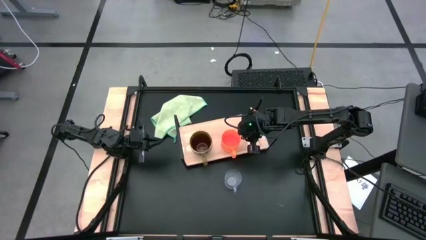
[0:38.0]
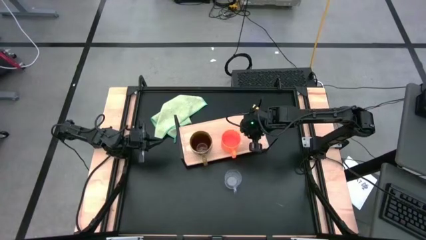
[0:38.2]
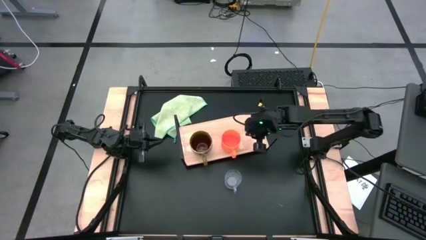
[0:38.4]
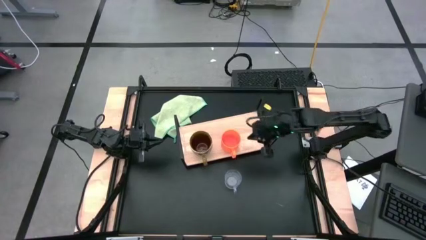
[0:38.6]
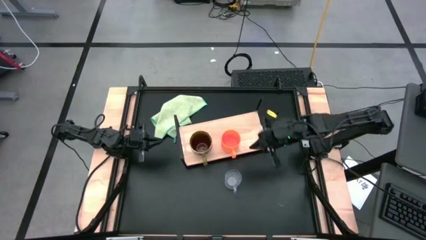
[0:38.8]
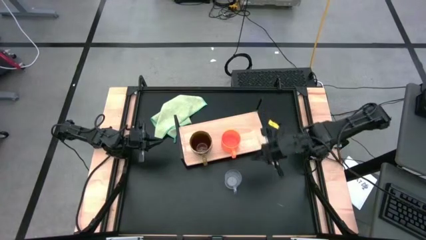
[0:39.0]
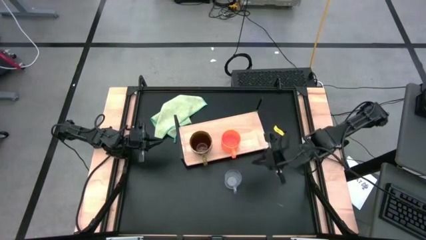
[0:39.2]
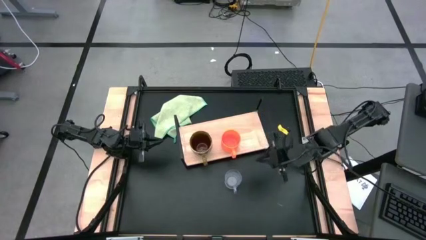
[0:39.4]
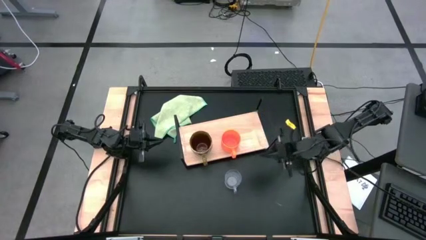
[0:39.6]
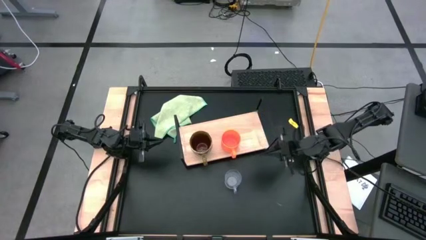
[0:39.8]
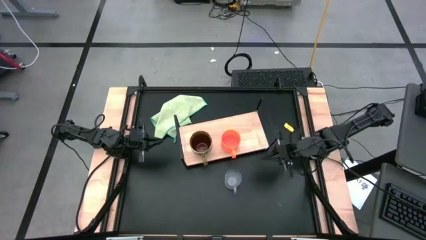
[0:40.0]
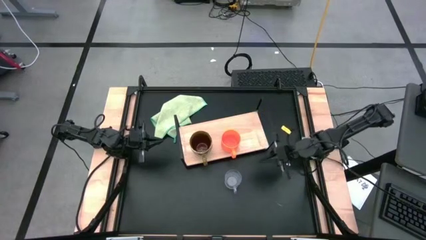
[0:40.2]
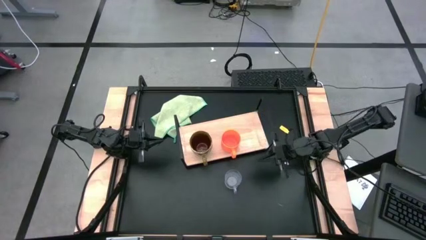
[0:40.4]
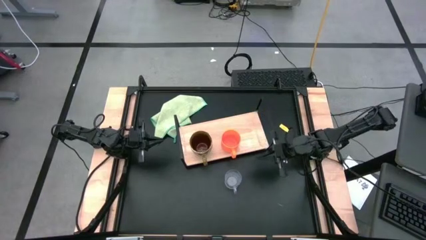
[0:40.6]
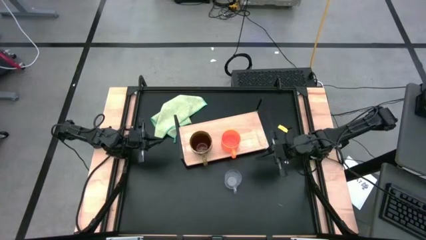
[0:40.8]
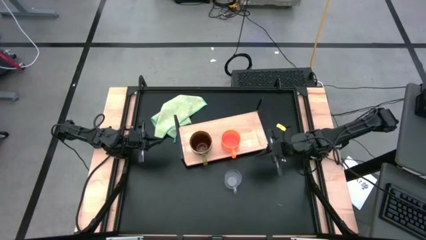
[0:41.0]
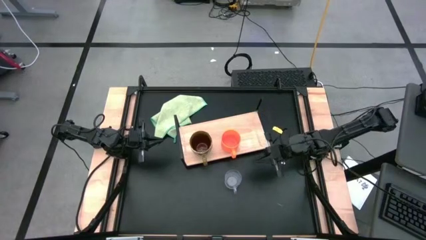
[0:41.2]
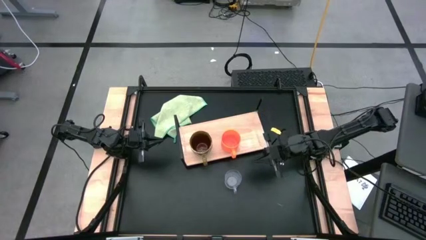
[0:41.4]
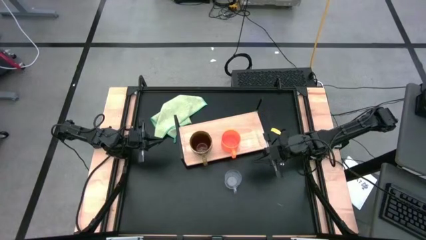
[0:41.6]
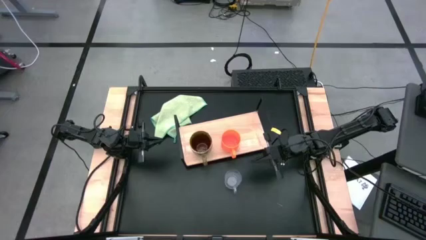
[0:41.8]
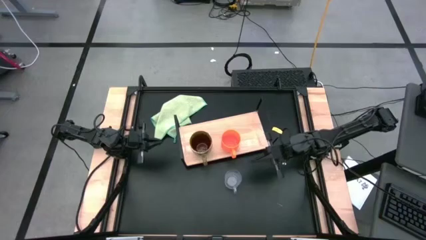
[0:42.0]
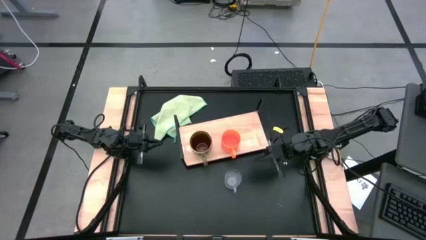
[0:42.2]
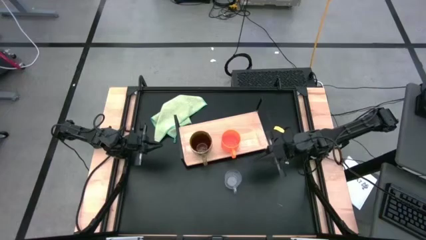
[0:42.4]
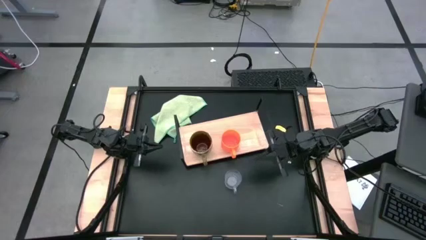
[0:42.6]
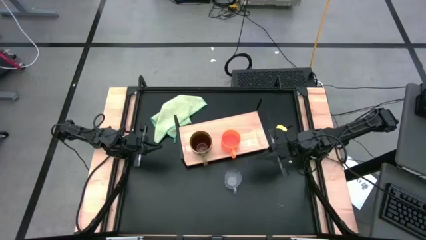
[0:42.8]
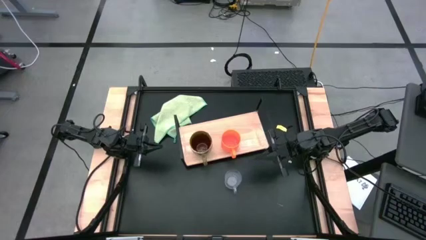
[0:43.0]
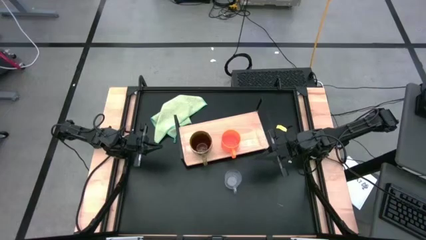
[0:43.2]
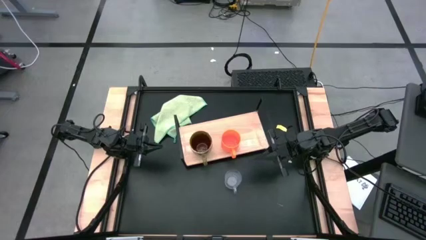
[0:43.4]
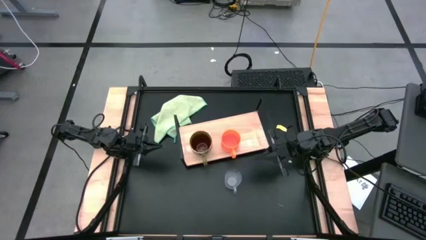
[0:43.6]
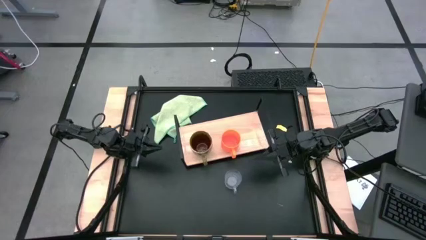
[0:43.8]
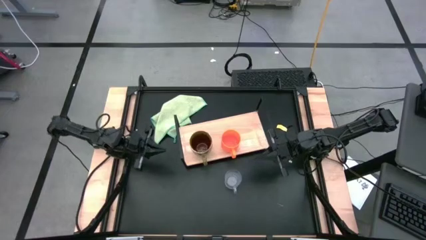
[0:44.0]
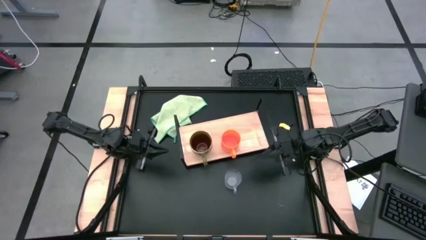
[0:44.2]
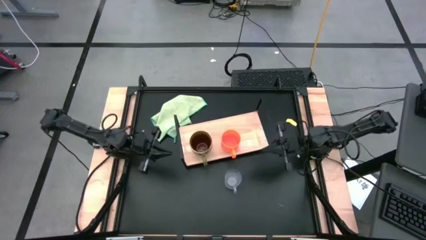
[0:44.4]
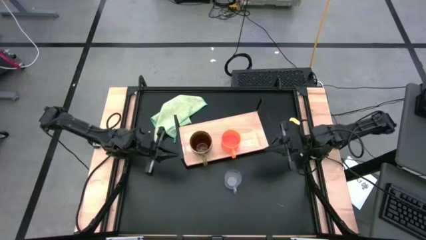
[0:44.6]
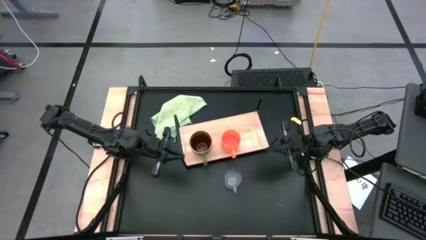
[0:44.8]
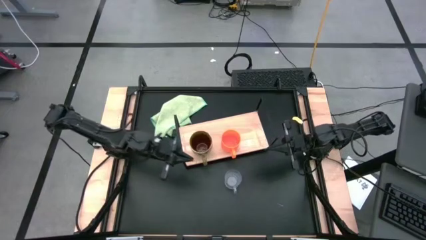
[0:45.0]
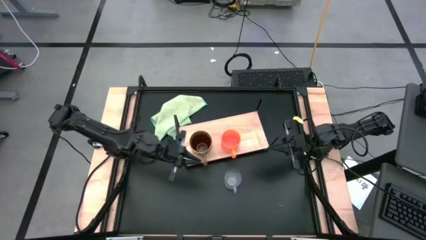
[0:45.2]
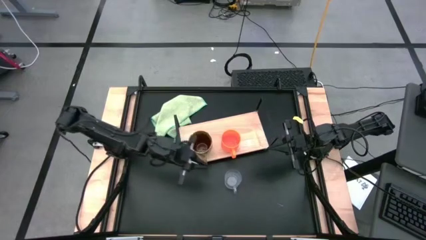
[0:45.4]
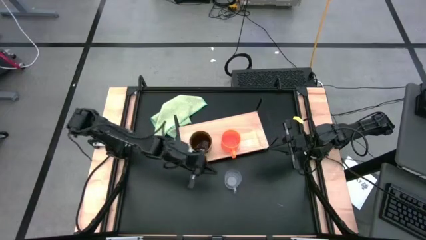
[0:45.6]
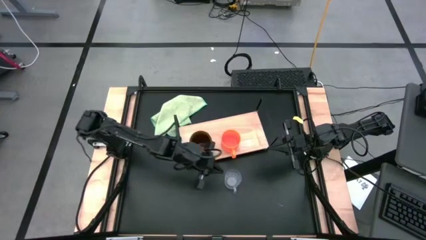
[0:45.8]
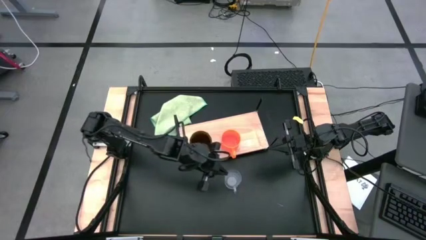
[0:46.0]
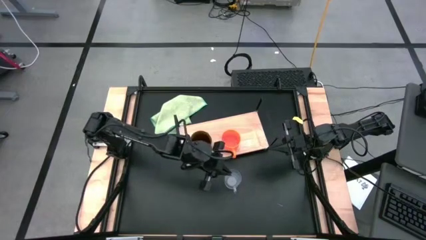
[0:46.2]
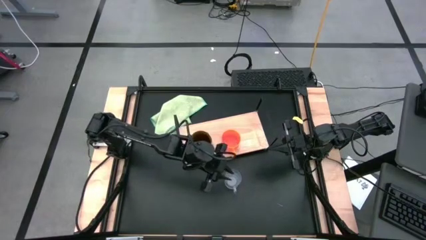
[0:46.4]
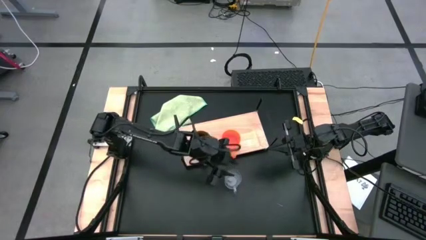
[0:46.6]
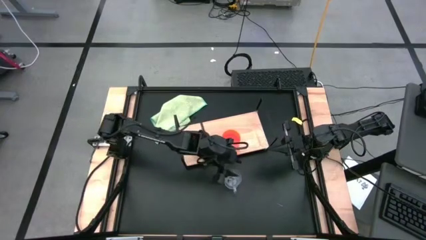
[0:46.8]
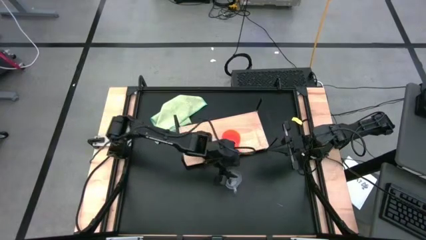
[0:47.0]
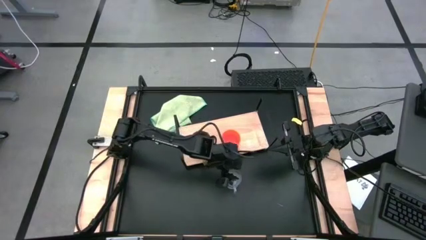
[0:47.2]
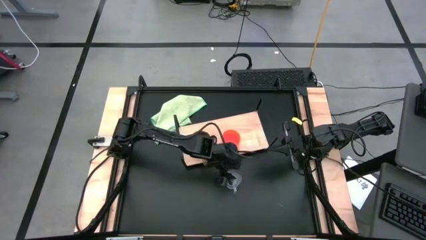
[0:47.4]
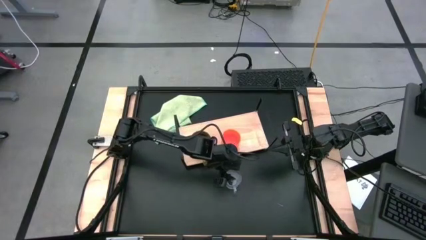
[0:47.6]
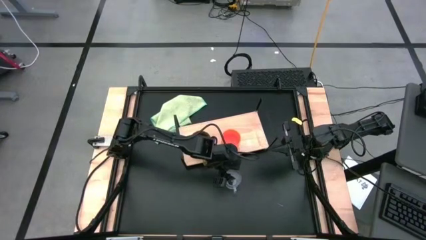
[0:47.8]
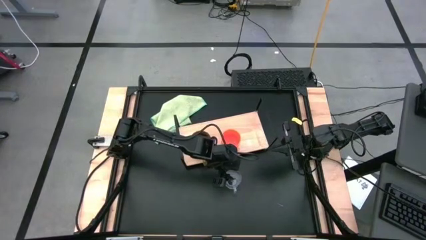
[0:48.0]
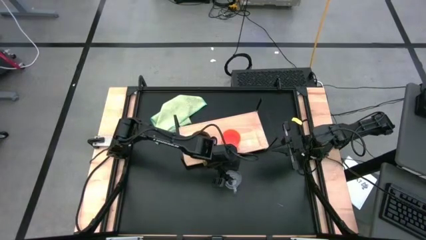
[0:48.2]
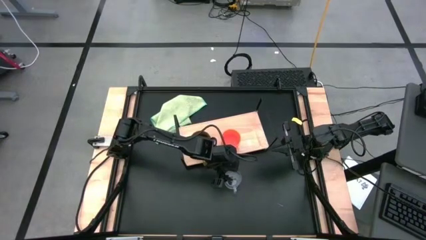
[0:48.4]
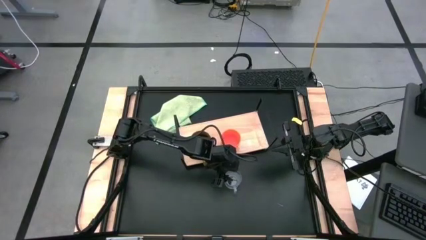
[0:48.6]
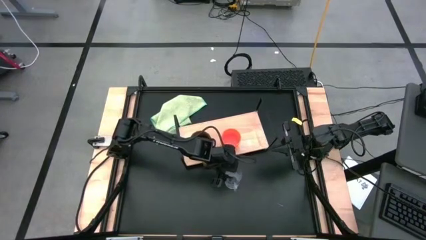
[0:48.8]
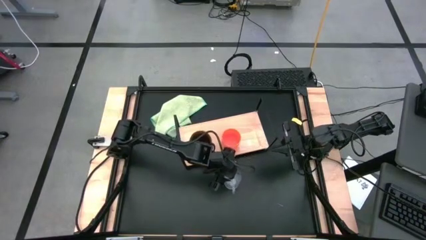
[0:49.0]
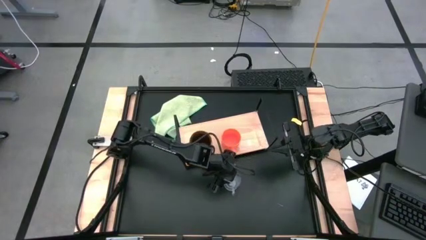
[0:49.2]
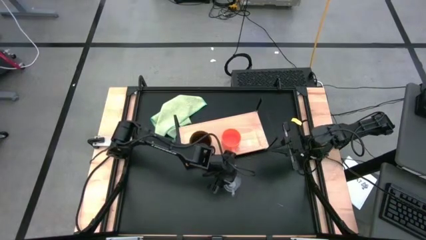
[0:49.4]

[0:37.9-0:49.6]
Task: Stack small to large cups/mugs on shelf
Put the transparent mug on the shelf

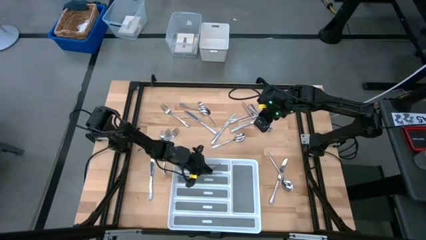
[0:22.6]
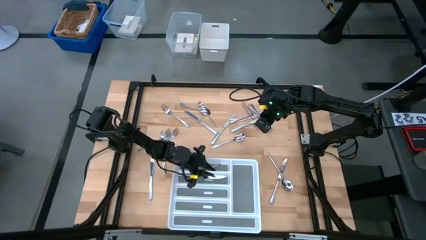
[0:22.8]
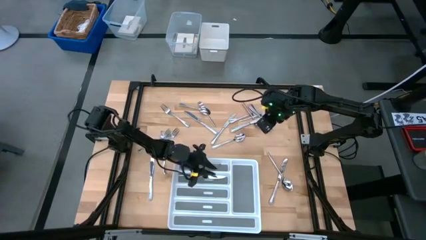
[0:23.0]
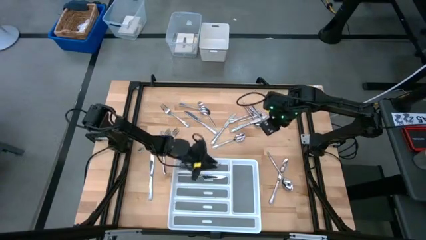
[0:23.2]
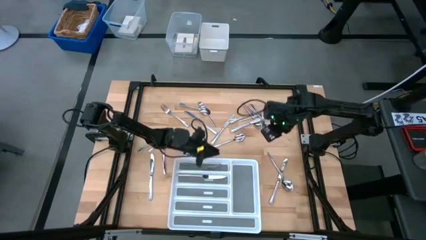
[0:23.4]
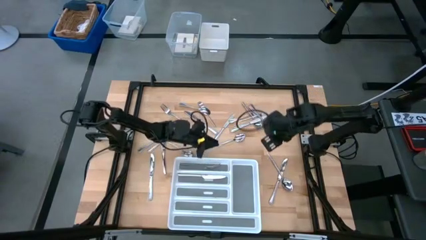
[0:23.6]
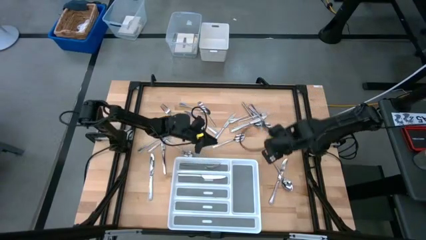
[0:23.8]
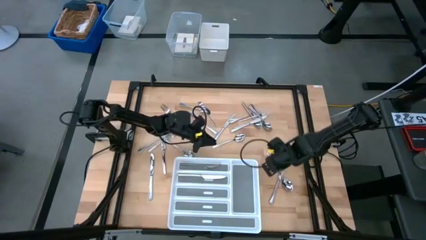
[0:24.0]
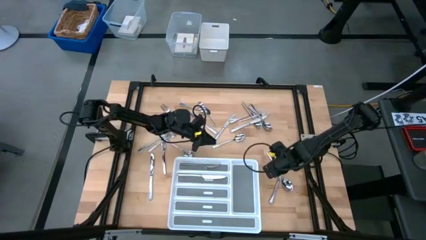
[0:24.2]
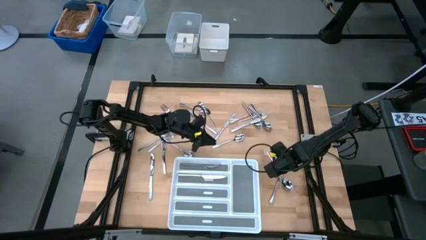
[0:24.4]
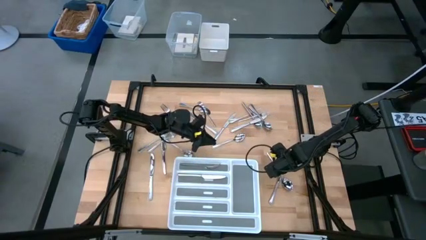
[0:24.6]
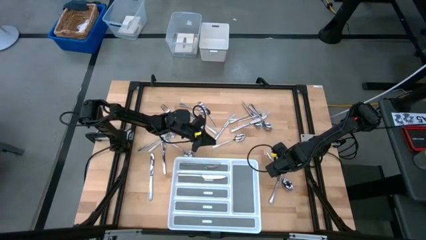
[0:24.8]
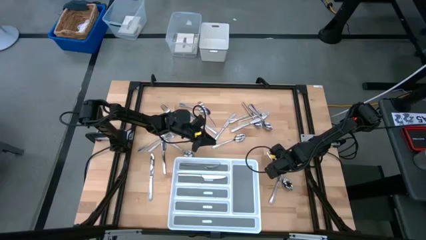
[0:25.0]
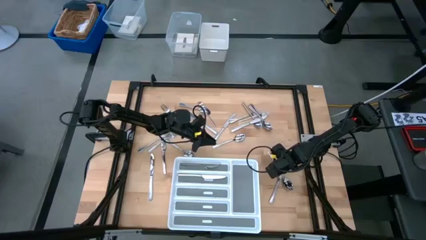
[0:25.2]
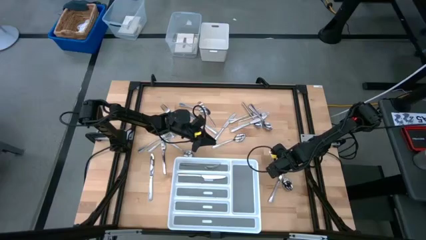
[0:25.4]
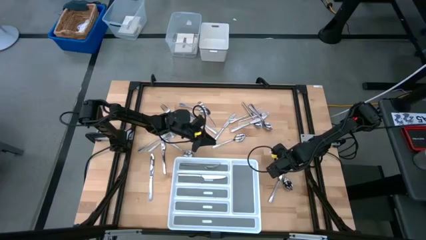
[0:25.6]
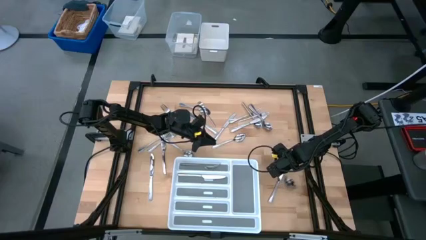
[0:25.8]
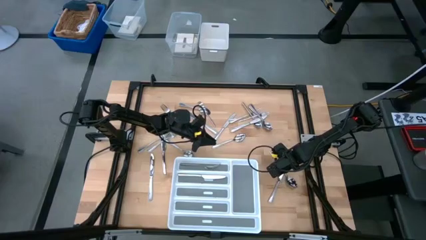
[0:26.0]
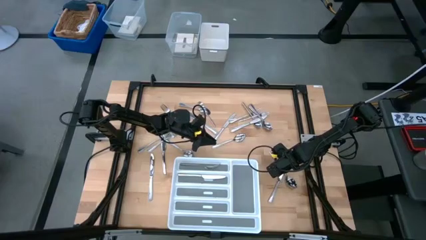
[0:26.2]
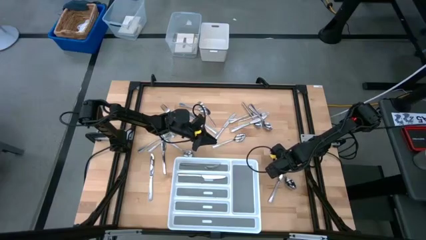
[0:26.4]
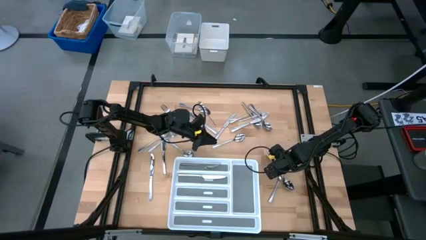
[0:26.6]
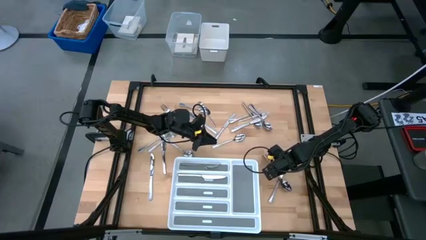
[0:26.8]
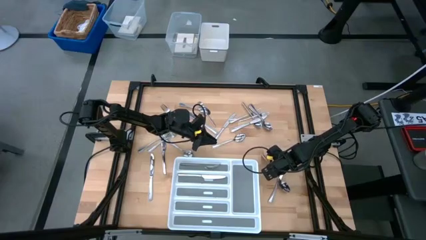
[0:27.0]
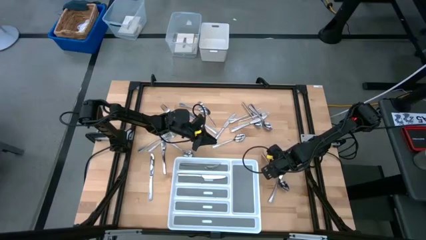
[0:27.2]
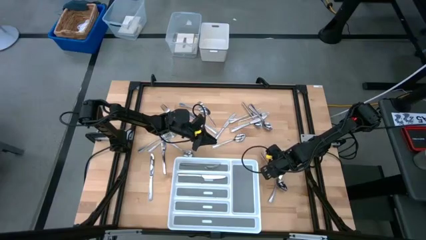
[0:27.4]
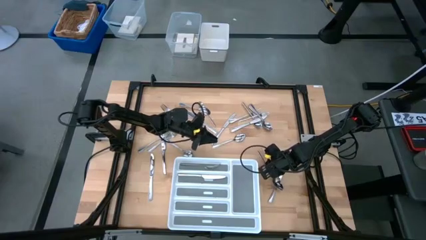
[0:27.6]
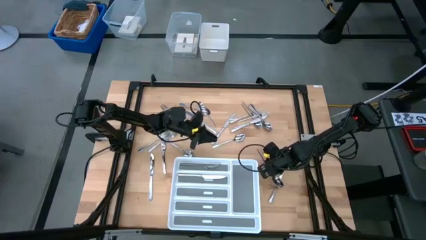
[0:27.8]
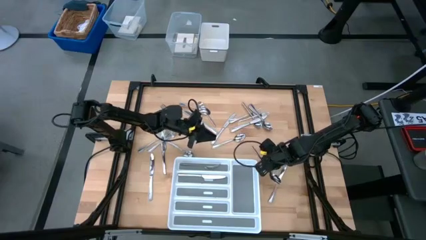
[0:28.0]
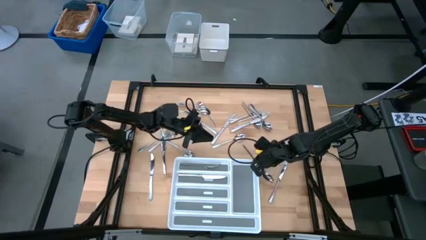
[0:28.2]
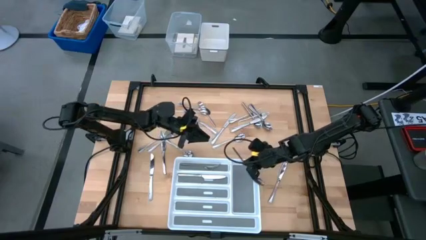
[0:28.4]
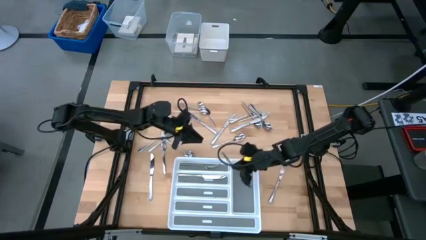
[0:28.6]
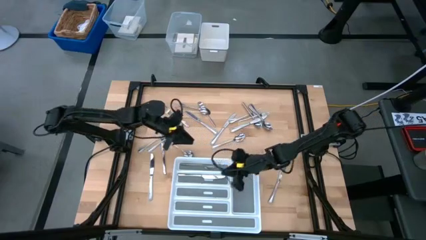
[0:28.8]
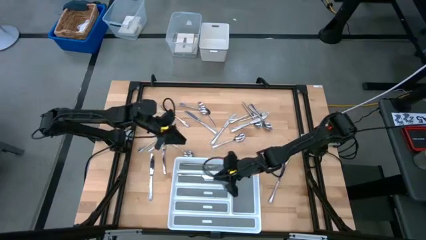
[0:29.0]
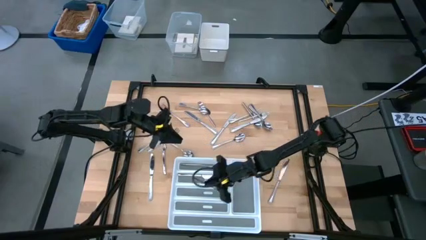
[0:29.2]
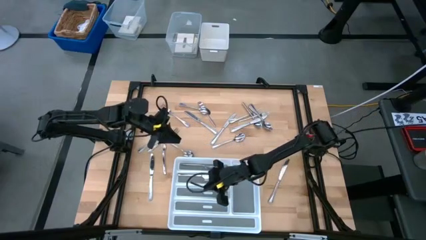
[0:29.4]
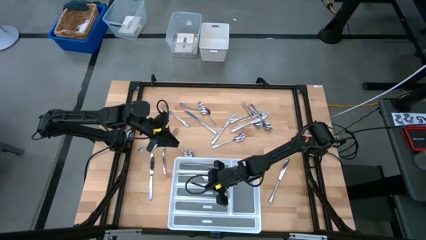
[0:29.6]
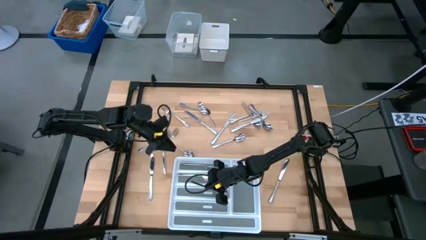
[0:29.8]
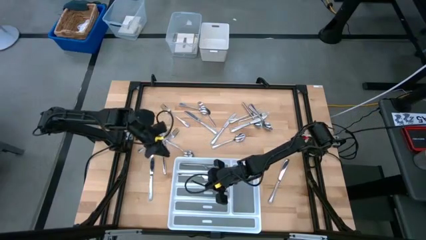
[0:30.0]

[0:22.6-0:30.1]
Task: Sort silverware
Put the silver spoon into the bottom section of the white silverware tray
